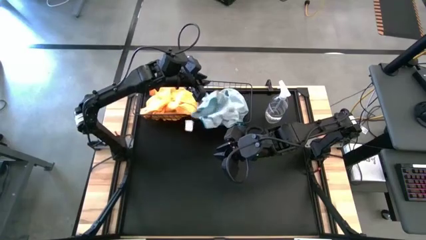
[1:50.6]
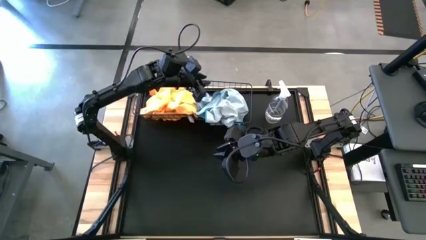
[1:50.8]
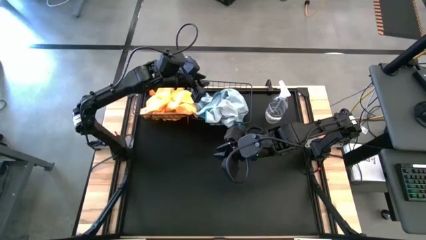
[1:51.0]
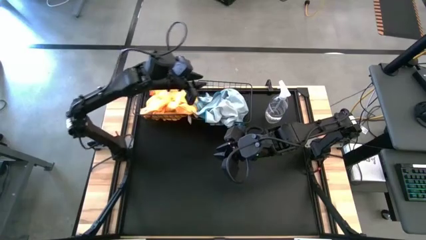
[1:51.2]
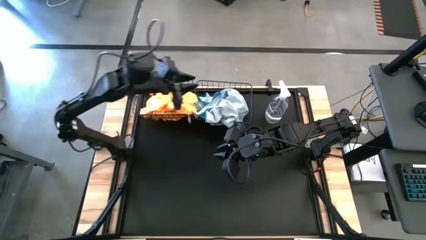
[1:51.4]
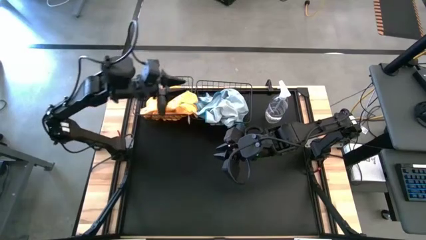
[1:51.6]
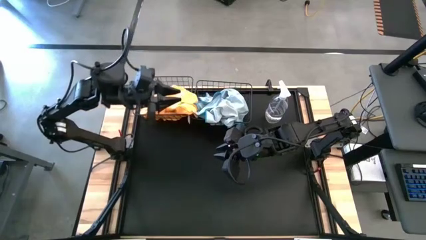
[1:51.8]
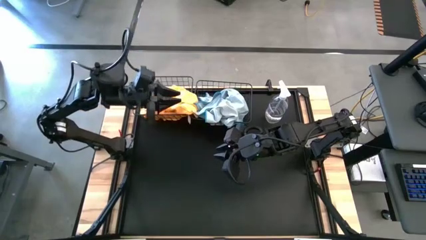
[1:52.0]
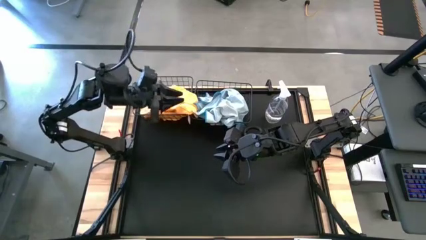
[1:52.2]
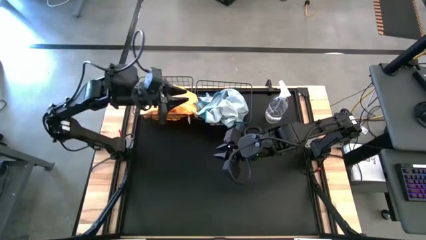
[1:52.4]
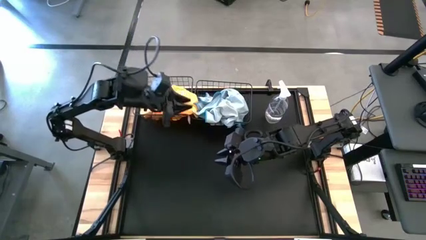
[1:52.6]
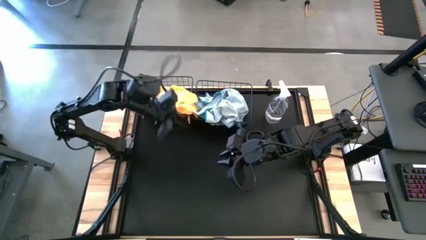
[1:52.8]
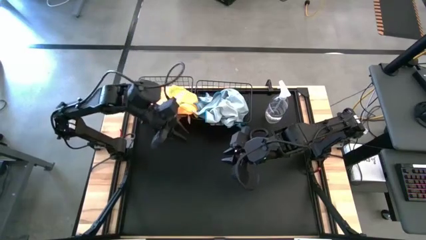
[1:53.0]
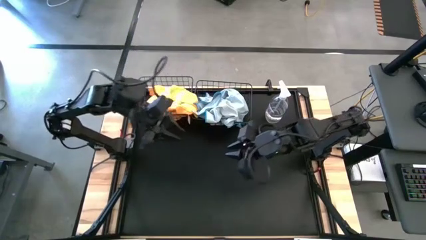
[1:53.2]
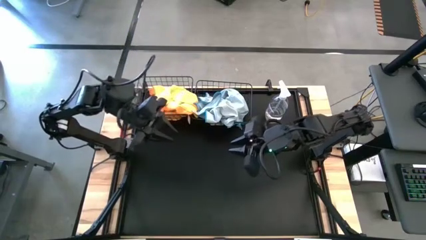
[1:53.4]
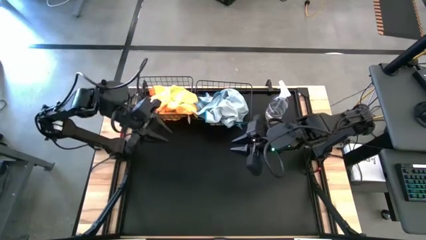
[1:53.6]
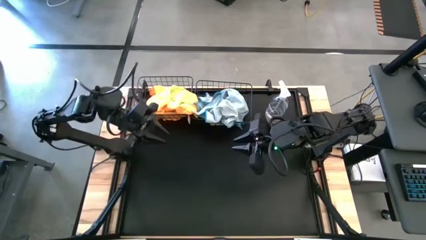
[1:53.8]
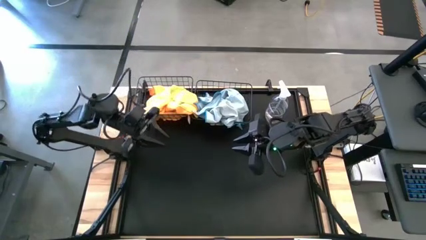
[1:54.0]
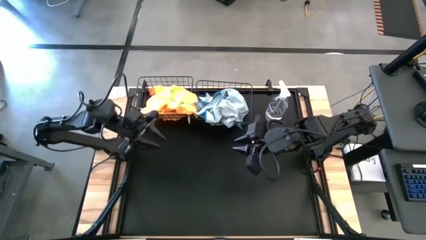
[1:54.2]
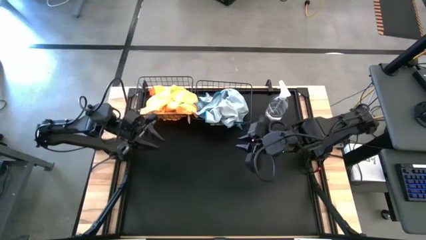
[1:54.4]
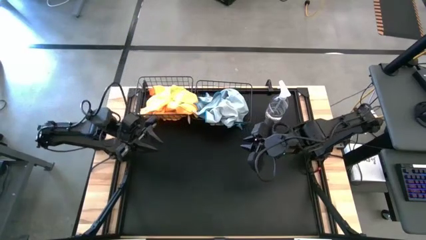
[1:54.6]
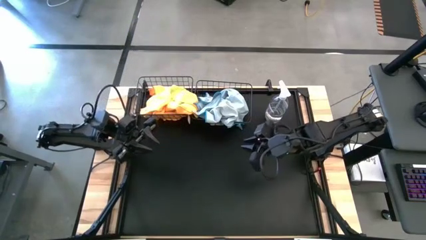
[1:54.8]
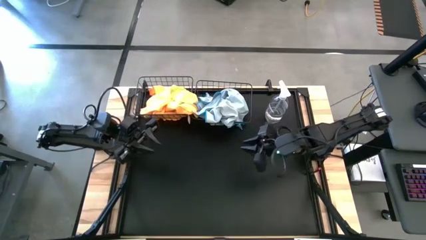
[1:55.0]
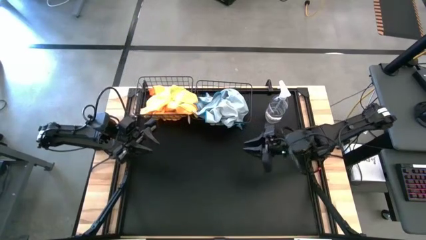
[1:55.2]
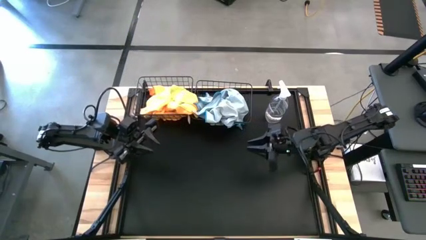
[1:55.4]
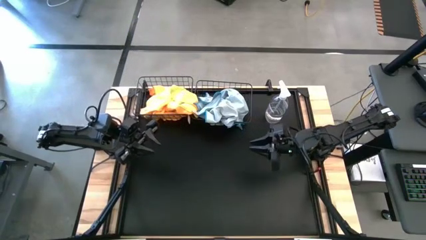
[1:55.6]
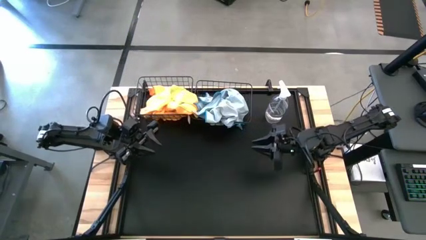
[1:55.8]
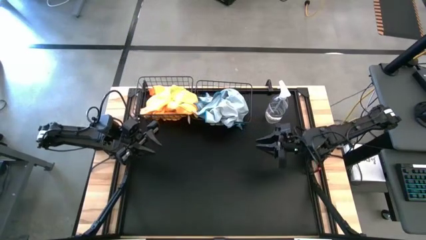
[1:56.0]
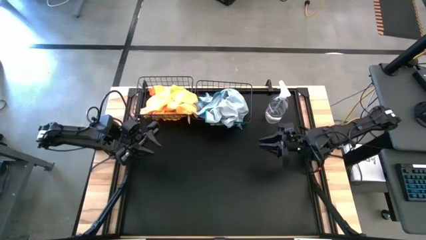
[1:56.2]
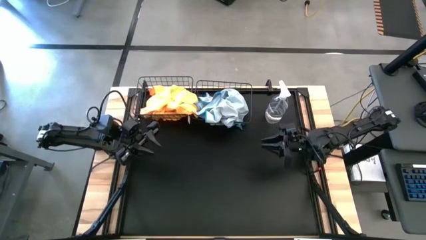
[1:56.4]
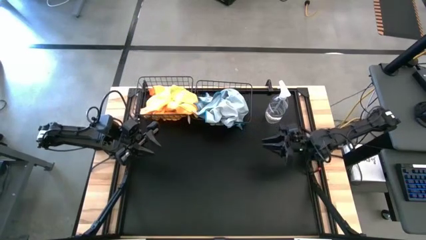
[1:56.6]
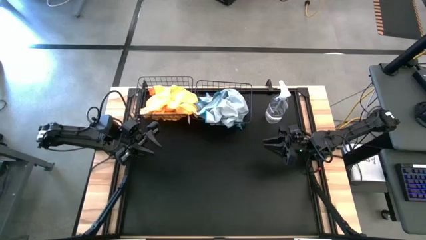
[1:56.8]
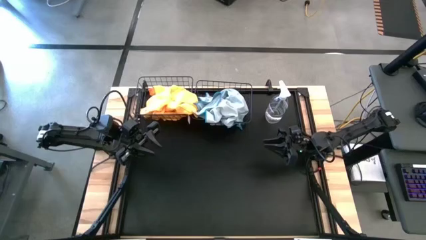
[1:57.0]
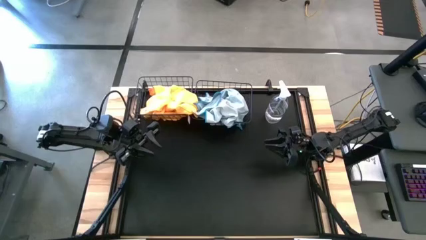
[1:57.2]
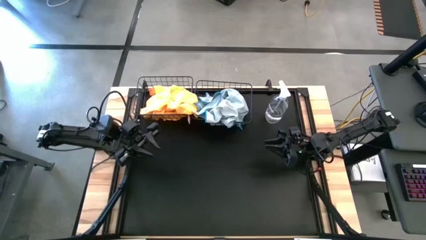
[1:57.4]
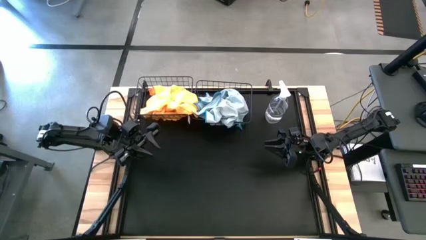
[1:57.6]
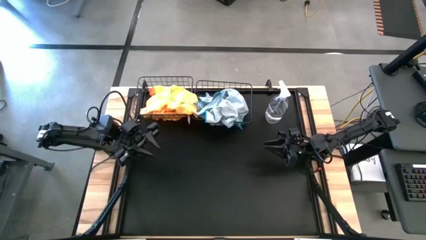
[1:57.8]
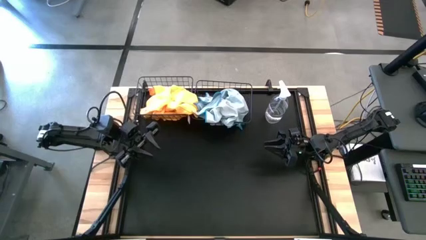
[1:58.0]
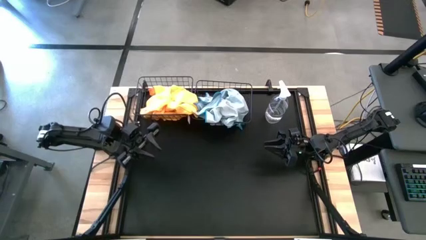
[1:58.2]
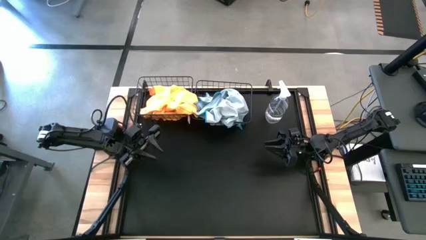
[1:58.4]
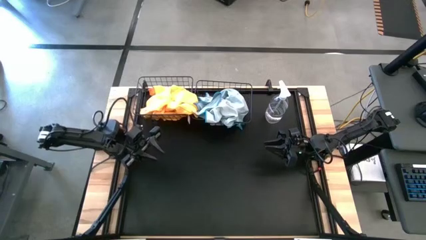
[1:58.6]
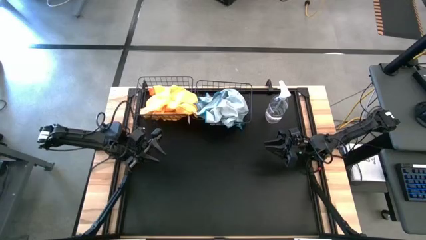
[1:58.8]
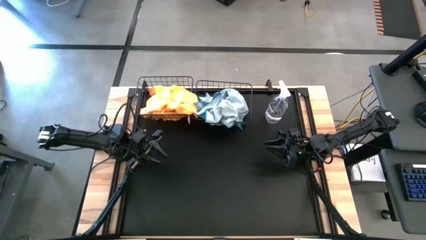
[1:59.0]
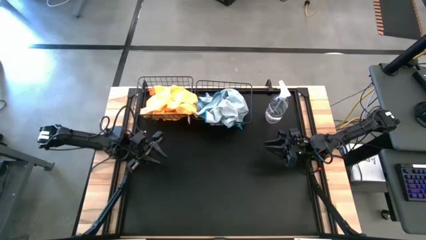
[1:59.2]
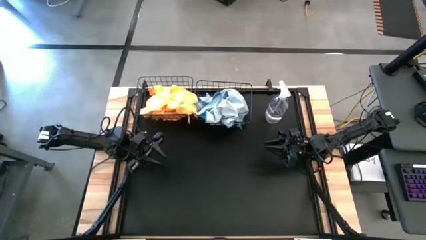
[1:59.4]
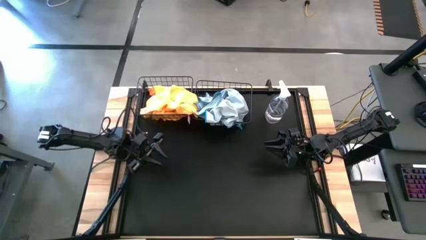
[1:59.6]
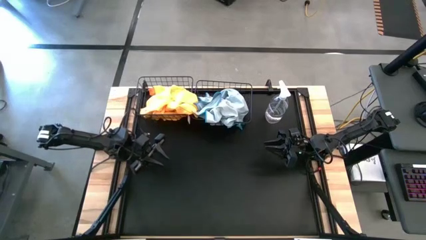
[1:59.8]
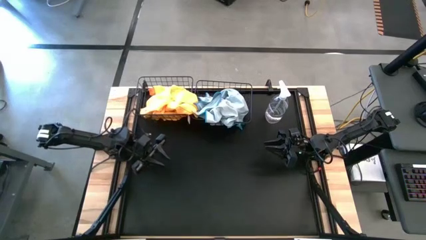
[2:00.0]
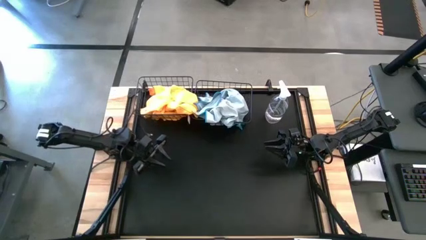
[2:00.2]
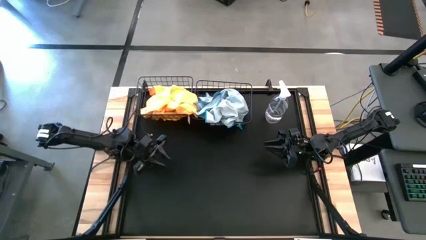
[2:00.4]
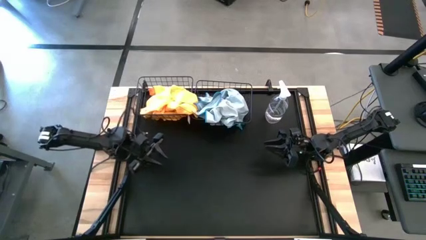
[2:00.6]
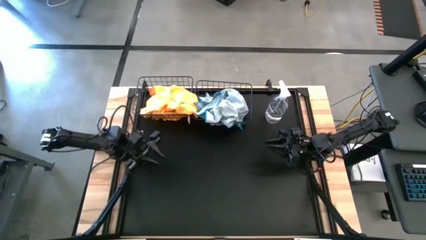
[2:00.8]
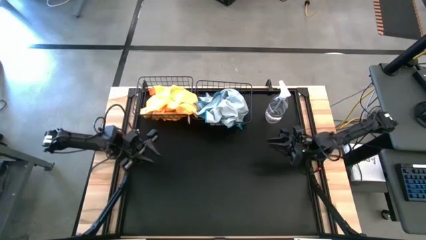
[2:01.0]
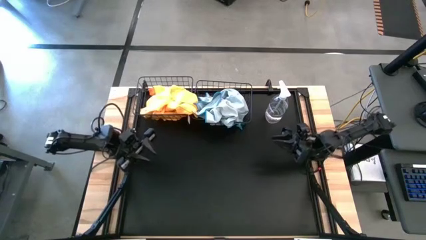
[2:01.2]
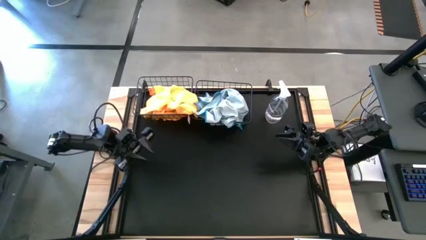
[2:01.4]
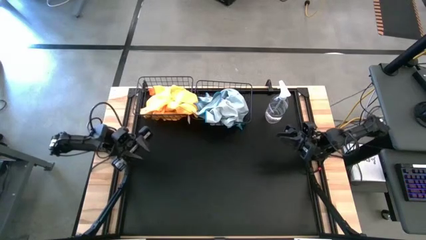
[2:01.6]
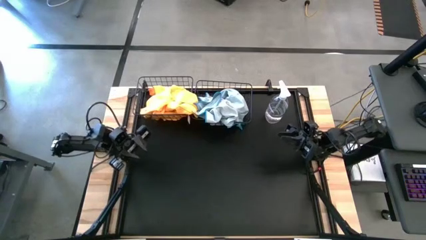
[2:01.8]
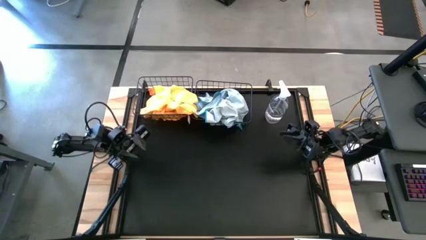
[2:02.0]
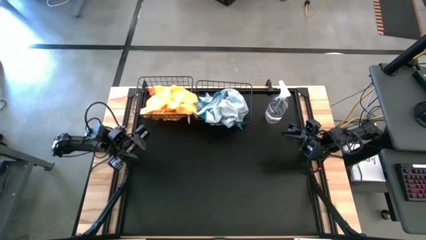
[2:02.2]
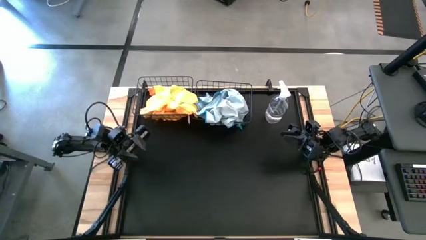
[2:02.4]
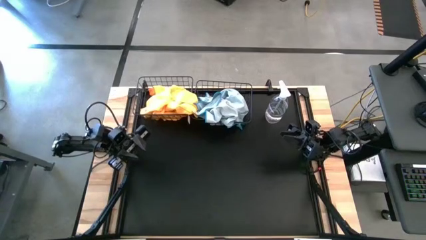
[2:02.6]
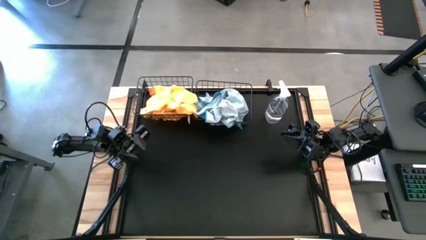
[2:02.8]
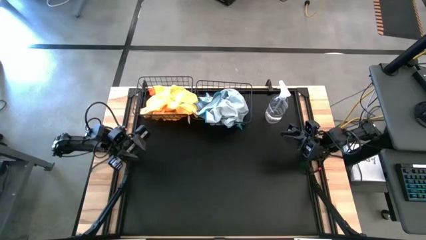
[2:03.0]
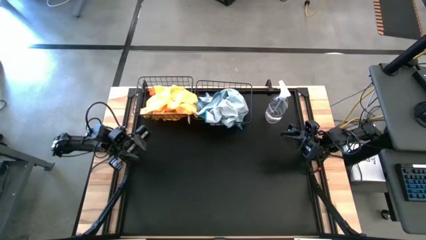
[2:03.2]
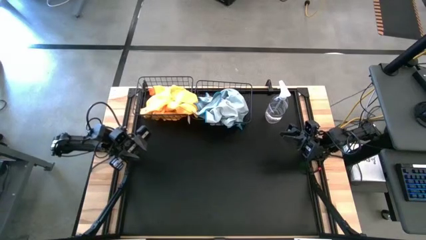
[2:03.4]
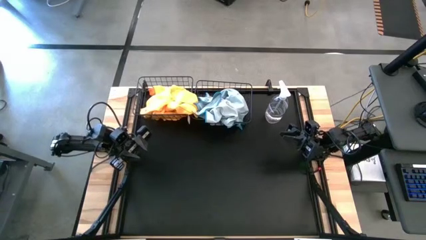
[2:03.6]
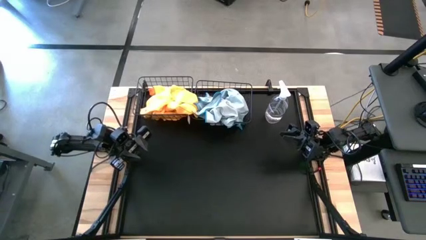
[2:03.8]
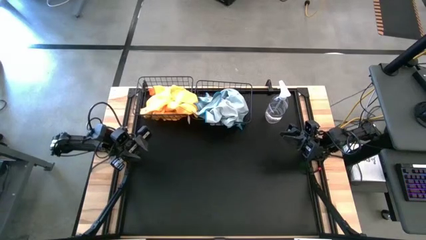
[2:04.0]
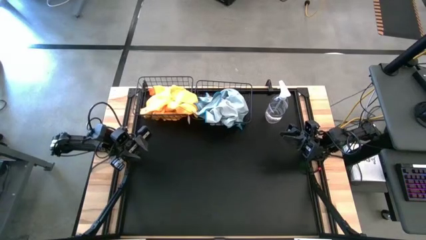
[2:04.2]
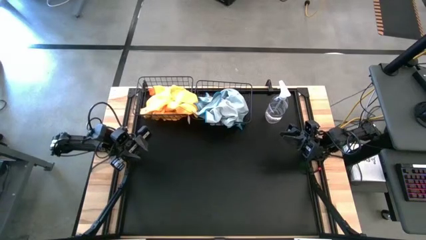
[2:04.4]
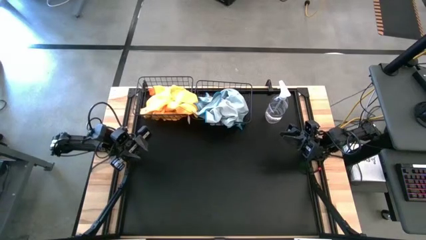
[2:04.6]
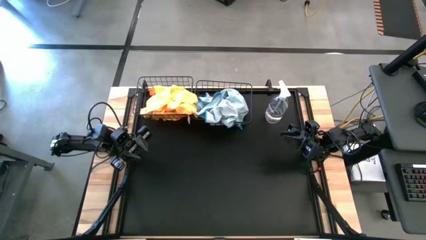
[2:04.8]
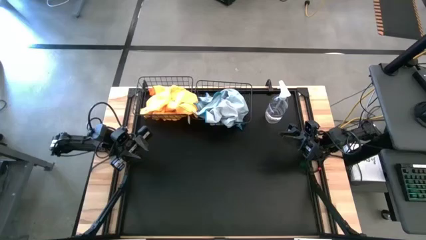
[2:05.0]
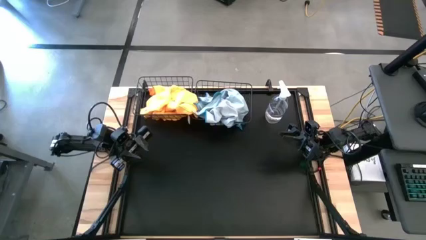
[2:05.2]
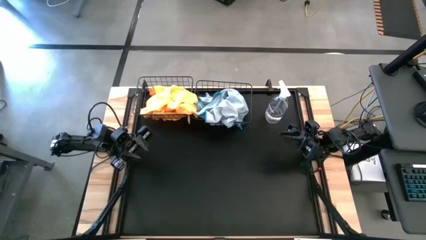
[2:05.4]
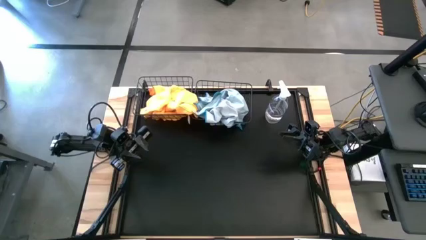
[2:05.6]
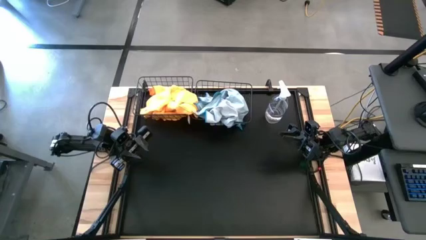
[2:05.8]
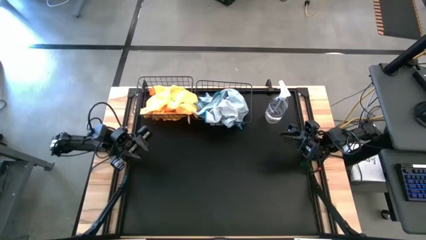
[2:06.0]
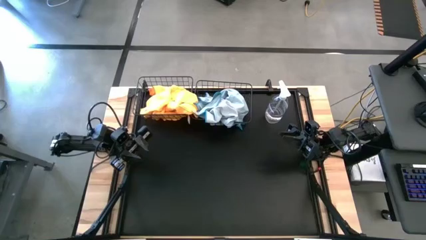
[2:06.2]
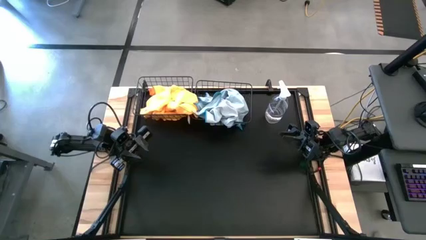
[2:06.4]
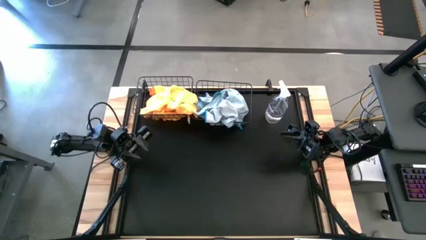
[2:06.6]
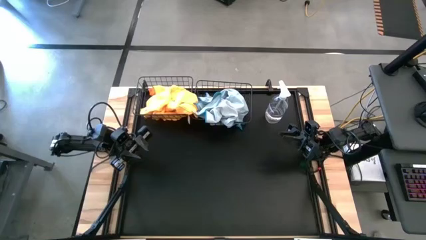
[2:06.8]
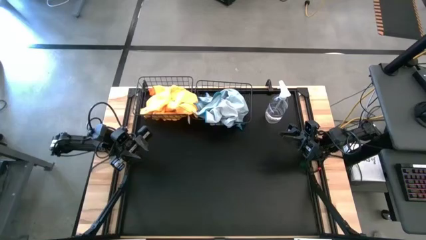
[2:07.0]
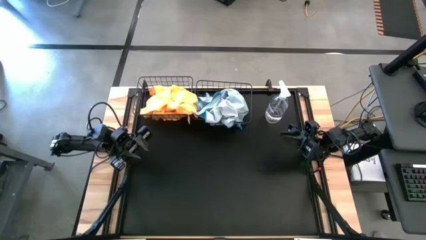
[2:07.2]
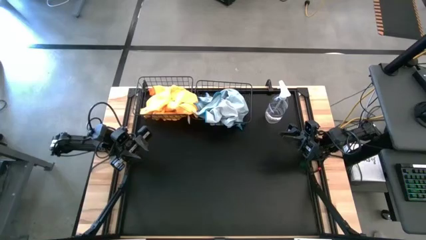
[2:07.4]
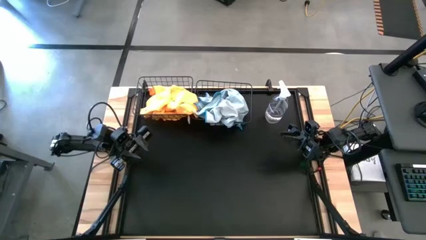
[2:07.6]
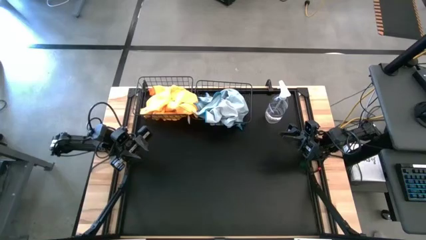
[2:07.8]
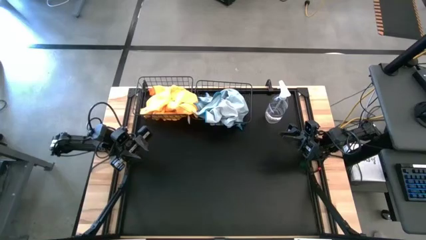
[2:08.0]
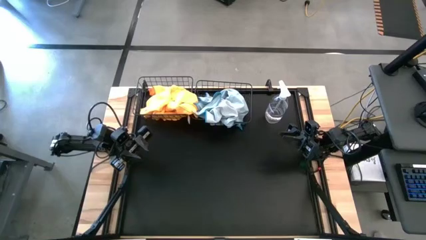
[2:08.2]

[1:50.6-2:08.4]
Task: Sort microfiber towel by color & place in baskets
Return to Home Position
